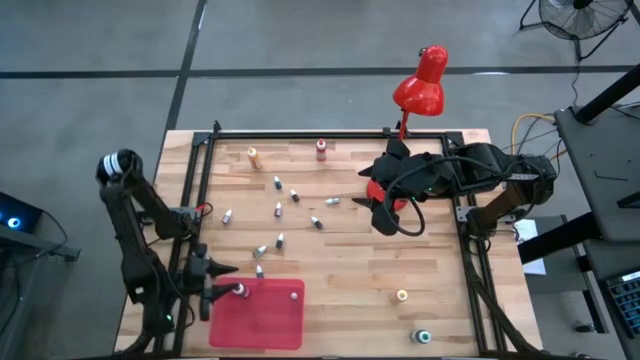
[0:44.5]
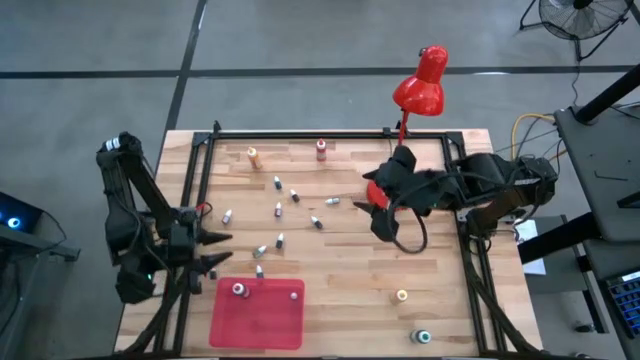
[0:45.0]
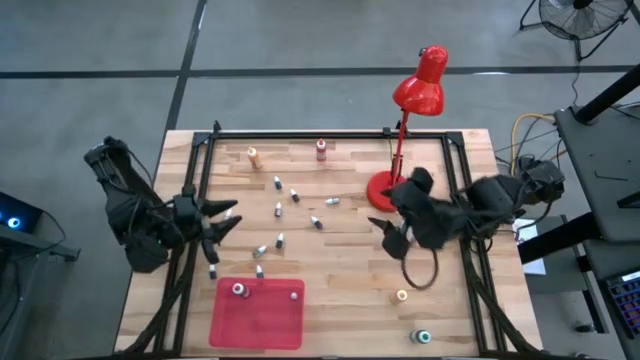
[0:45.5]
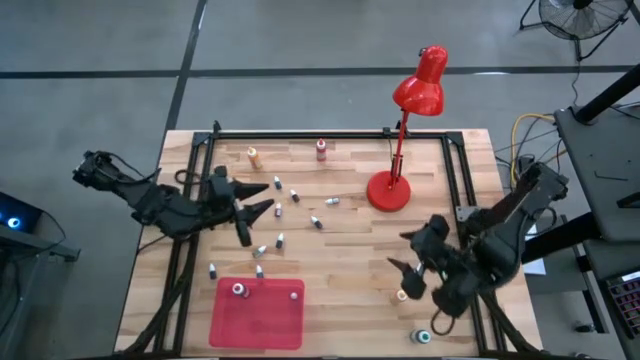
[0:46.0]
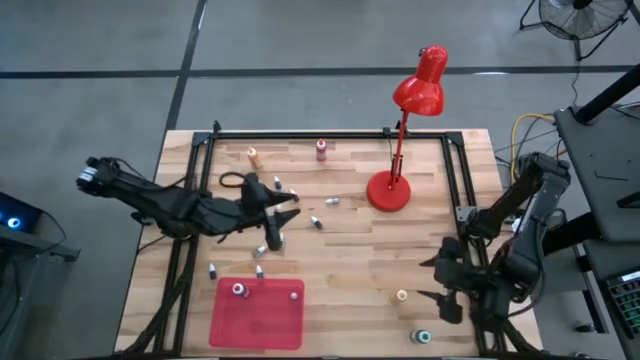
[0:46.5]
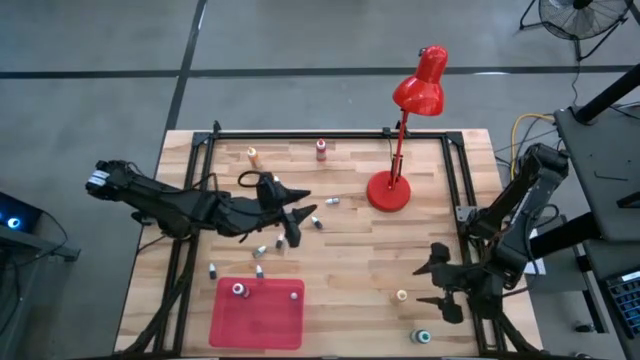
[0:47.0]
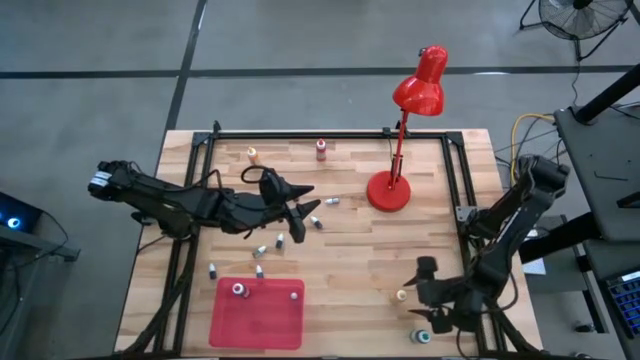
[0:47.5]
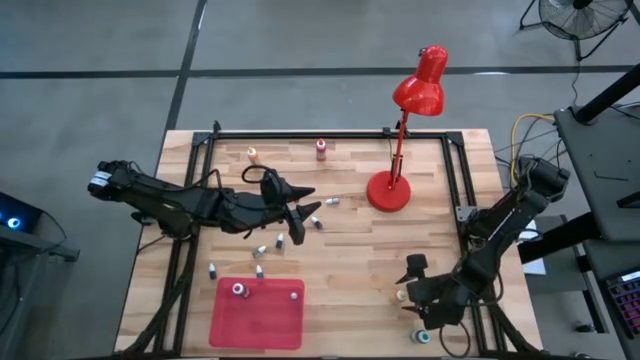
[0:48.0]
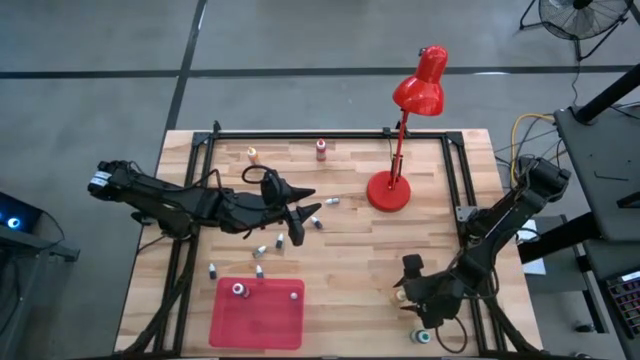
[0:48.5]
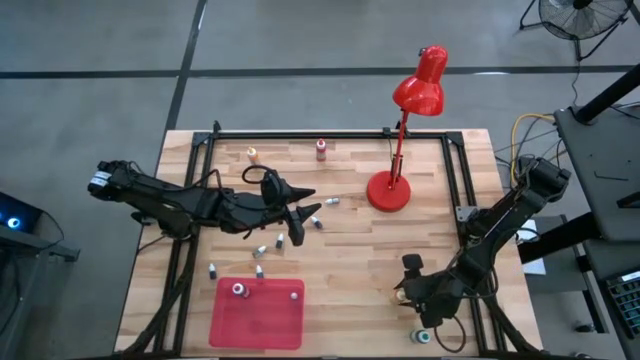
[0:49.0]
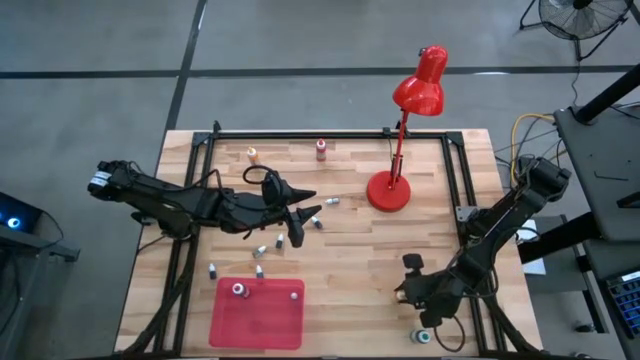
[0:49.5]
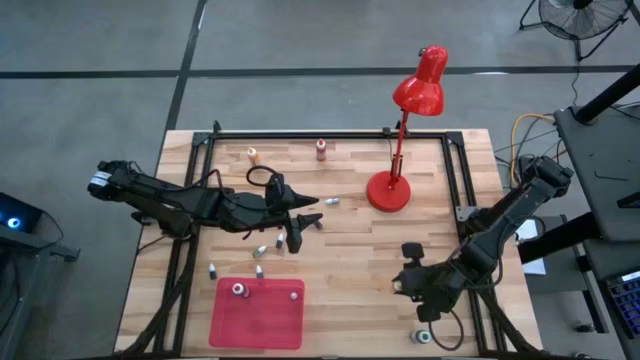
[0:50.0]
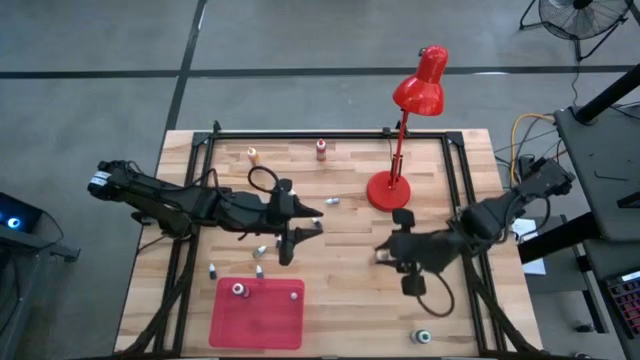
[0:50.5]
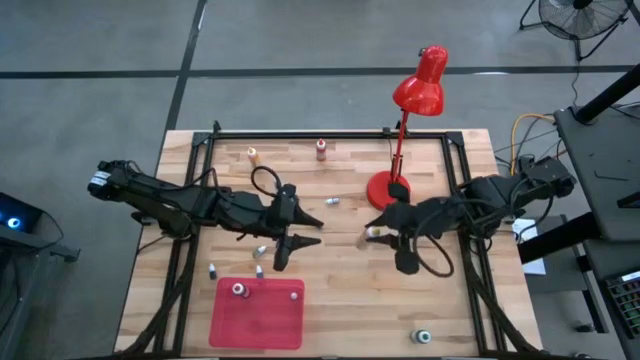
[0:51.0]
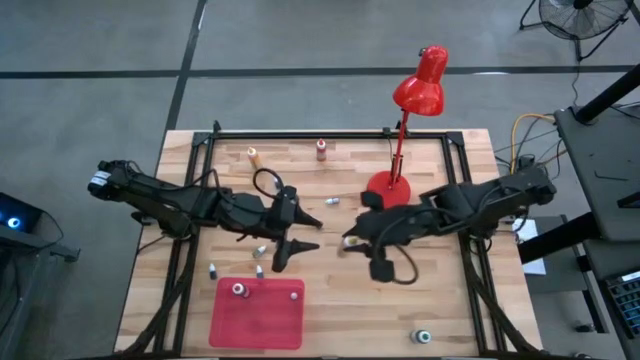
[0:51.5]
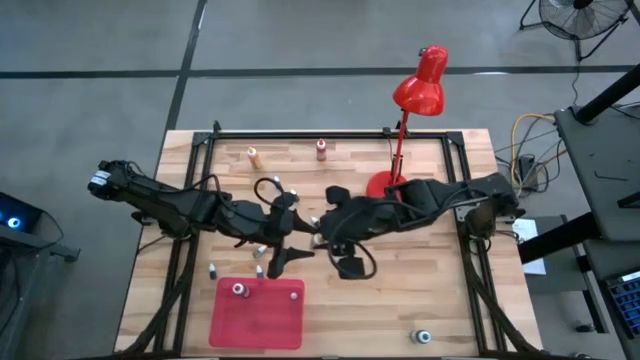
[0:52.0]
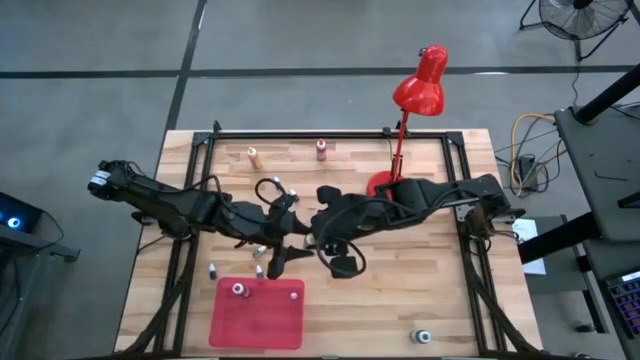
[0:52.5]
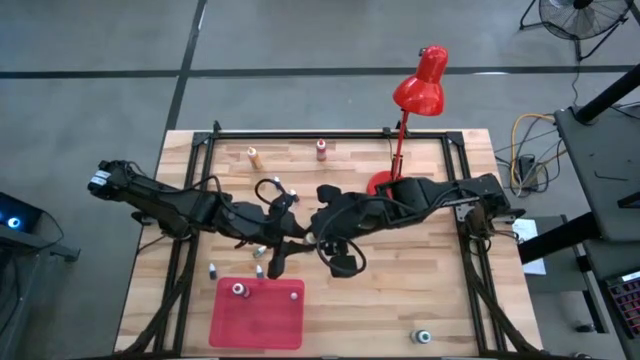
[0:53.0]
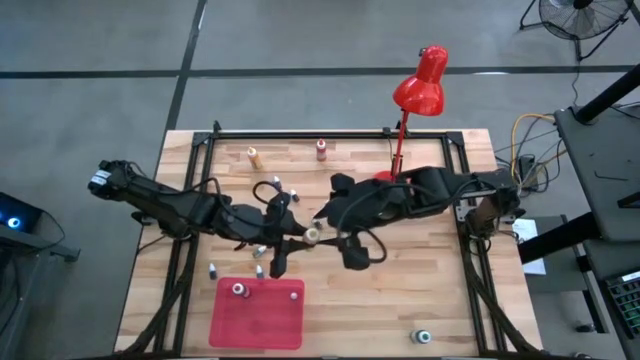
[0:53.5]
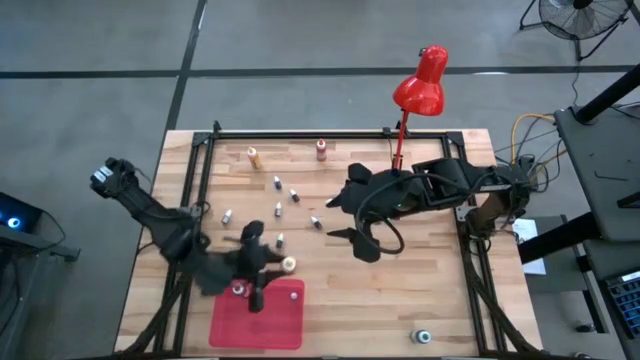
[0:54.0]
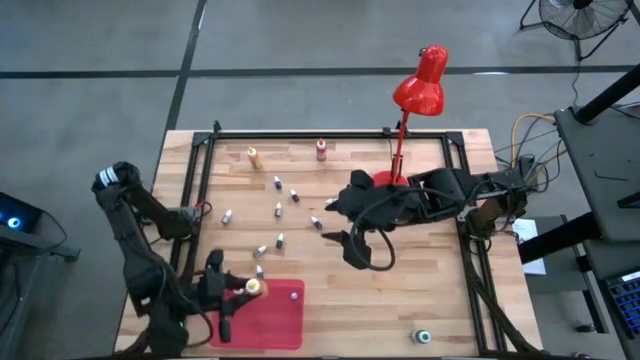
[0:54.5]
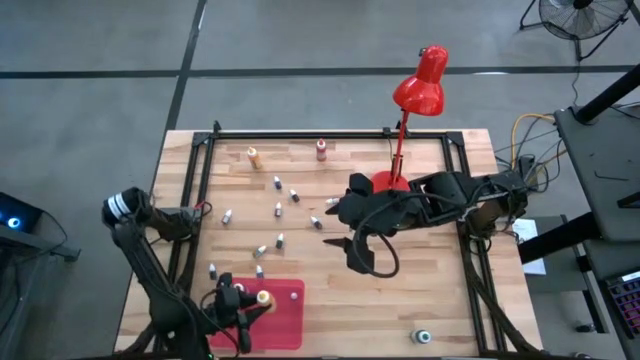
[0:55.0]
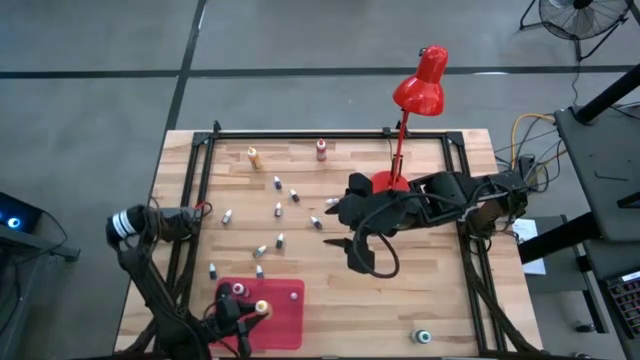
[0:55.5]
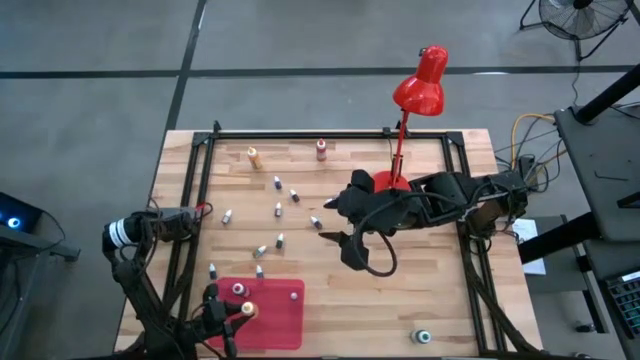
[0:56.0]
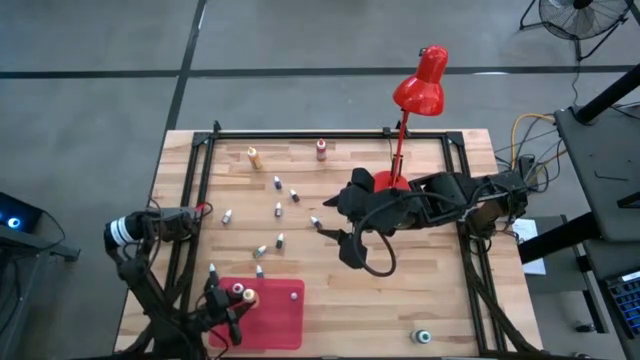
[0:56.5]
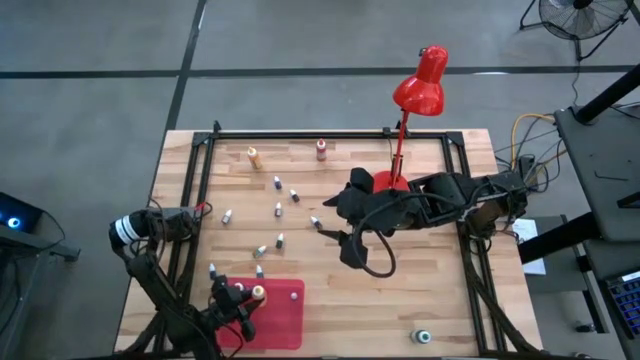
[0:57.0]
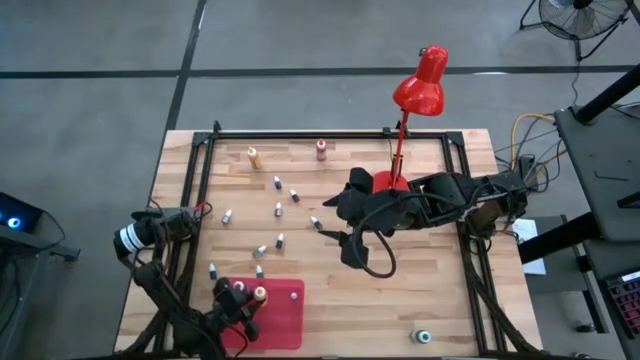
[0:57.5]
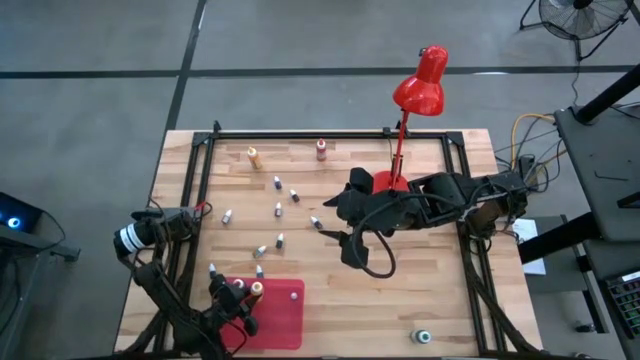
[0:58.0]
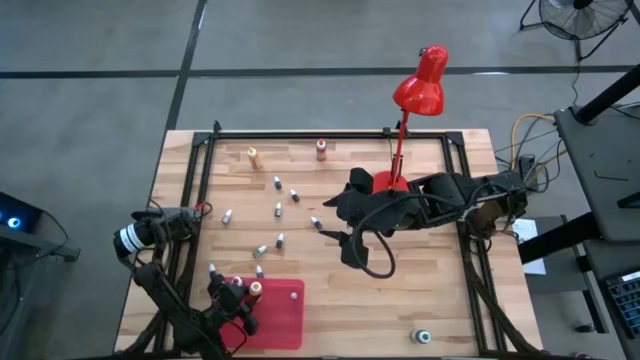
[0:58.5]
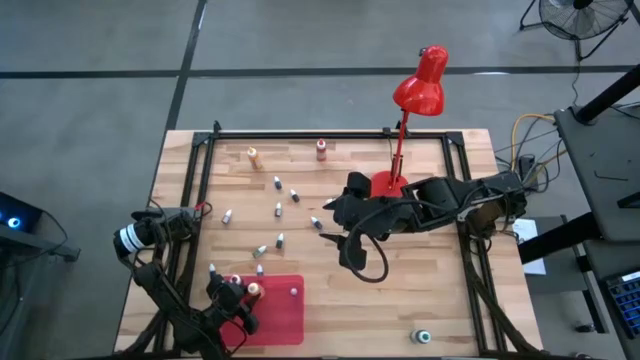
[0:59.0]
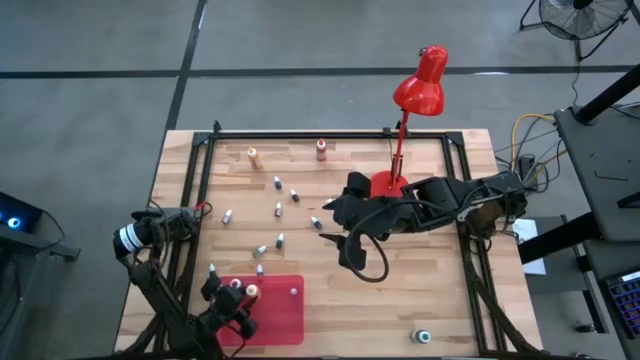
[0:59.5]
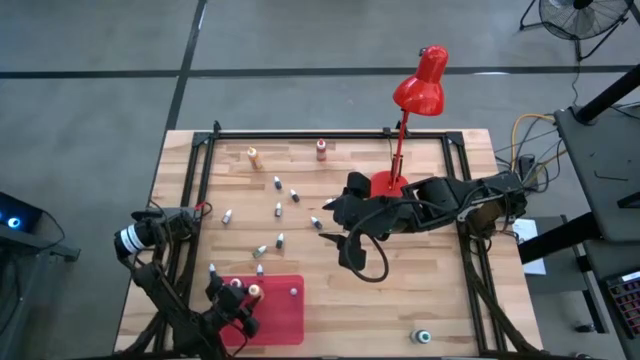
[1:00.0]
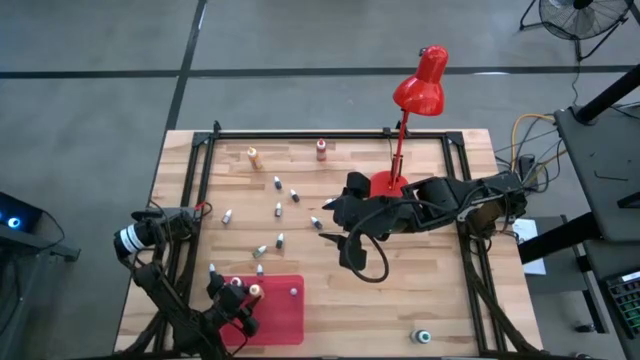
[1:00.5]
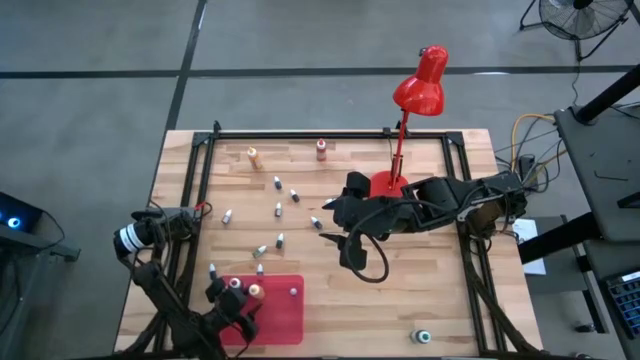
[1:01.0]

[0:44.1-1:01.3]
Task: Pick & Place food coloring
Put the large yellow food coloring bottle into the red bin

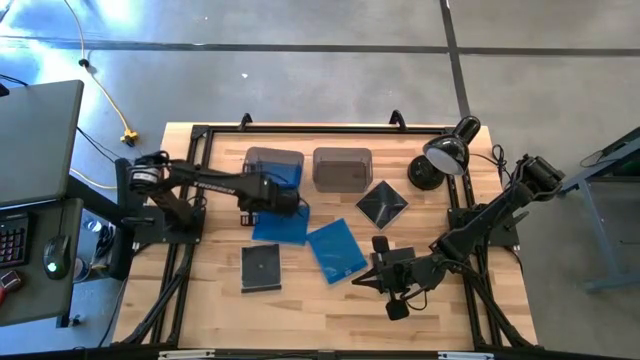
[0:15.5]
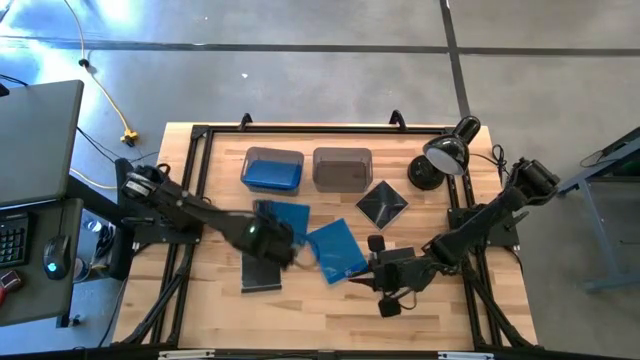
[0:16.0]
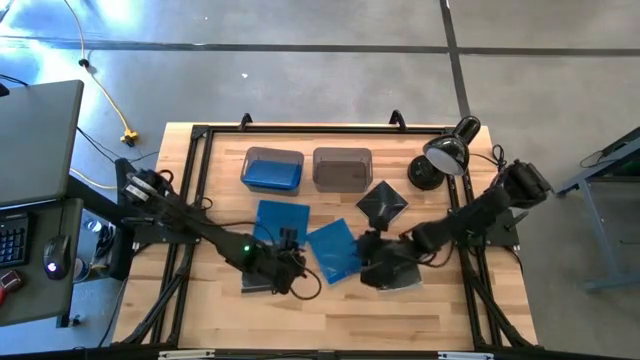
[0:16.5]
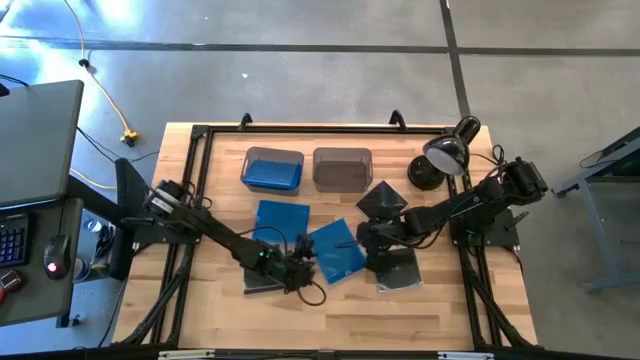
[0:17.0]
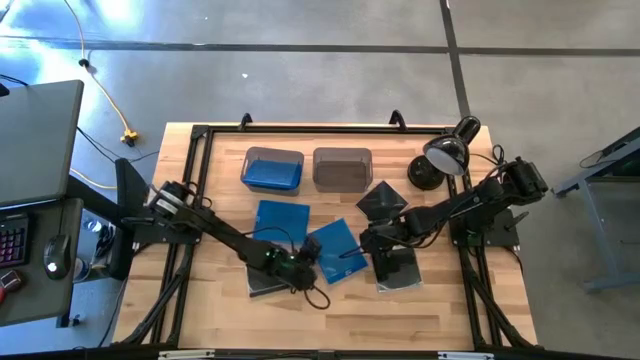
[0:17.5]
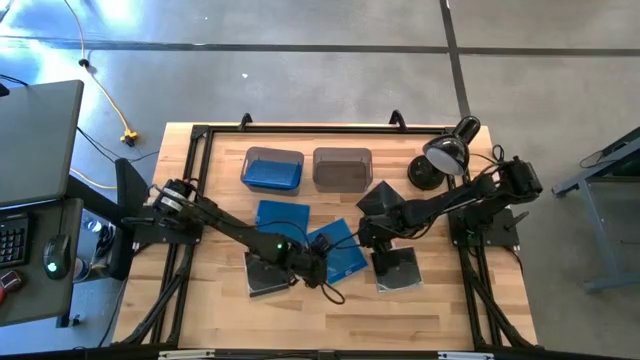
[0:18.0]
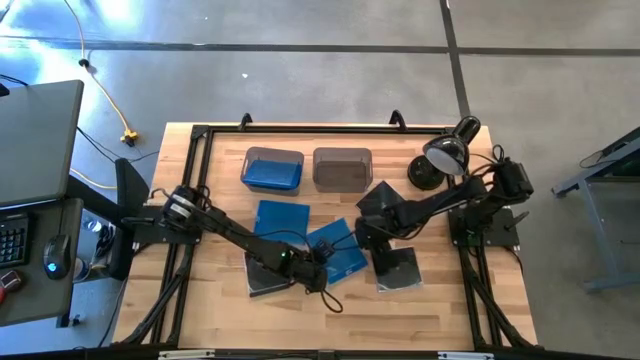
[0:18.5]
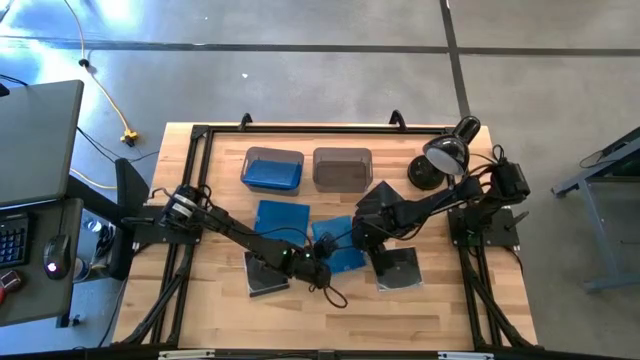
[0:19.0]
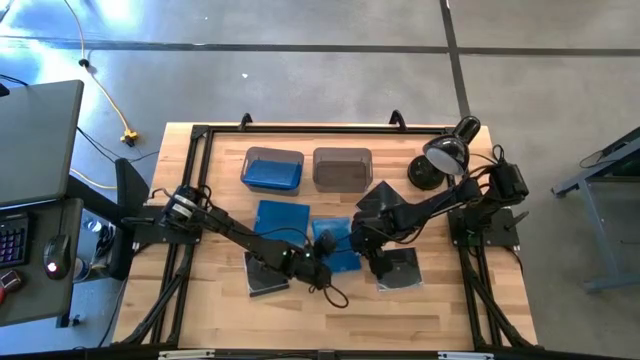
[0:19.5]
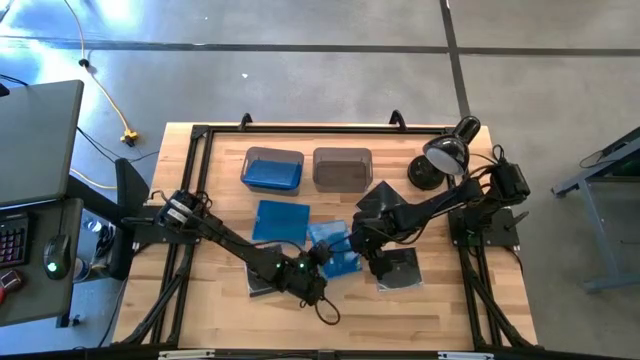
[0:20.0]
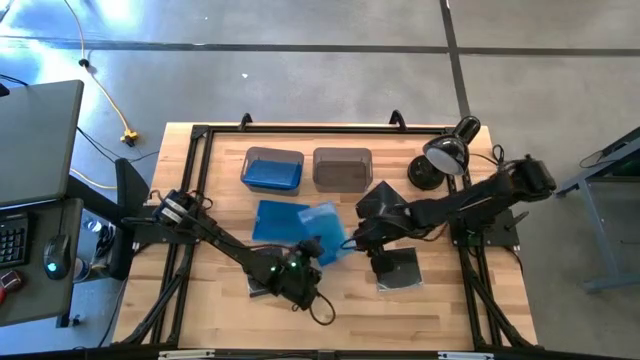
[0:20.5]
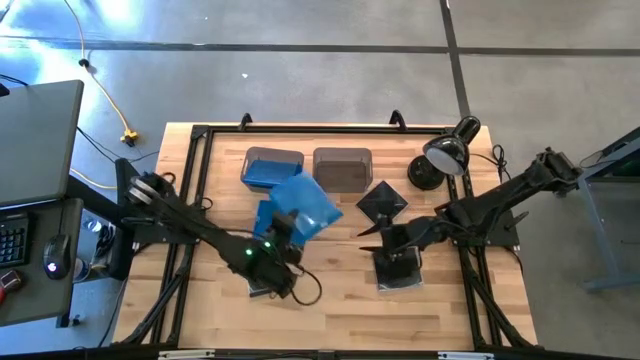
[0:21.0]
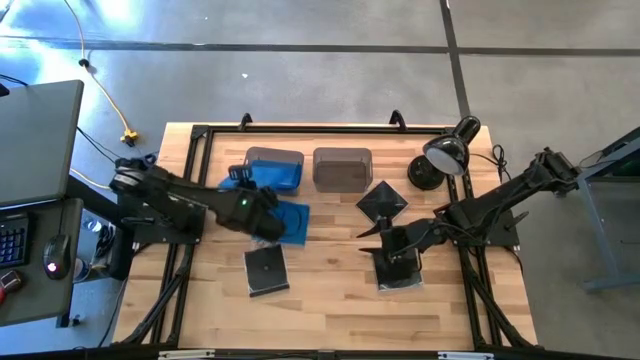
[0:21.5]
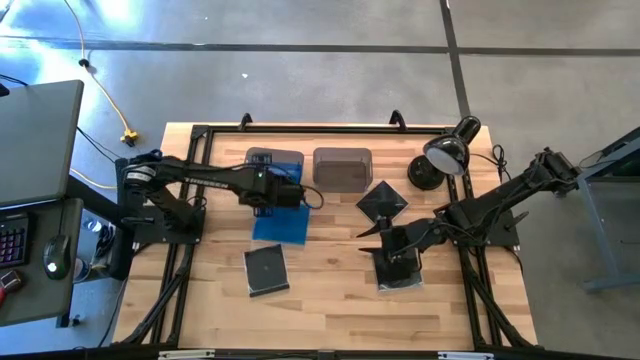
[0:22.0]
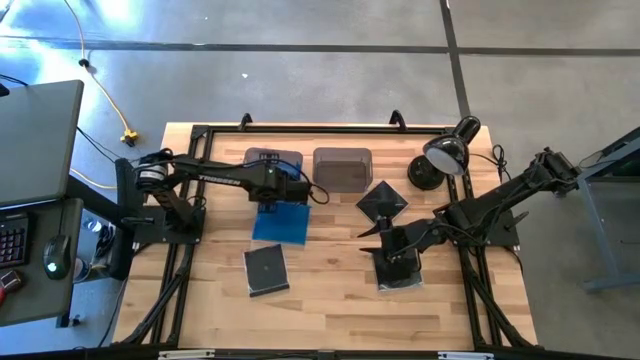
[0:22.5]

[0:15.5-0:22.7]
Task: Pick & place jewel cases by type
Put the right blue CD case into the left black bin
